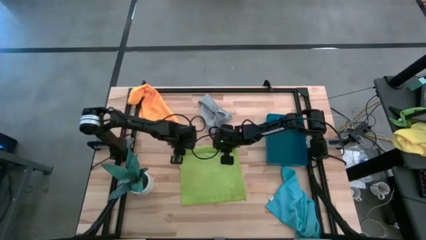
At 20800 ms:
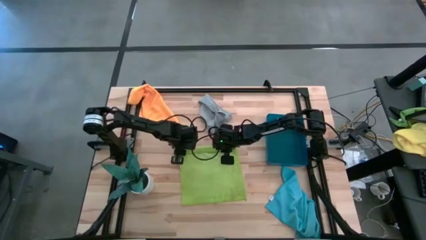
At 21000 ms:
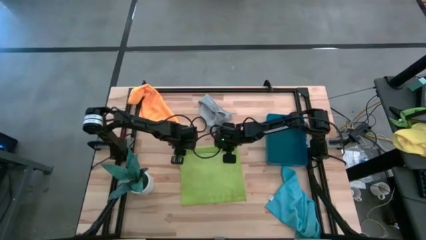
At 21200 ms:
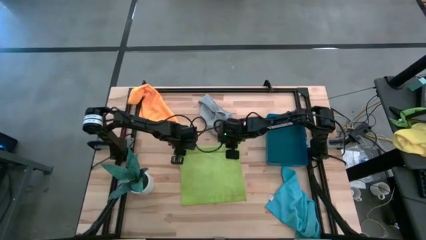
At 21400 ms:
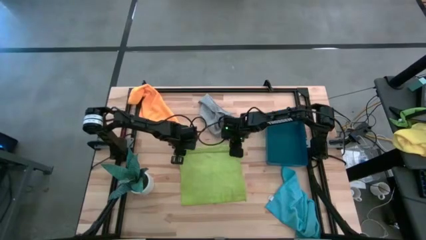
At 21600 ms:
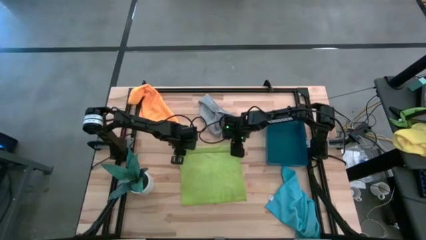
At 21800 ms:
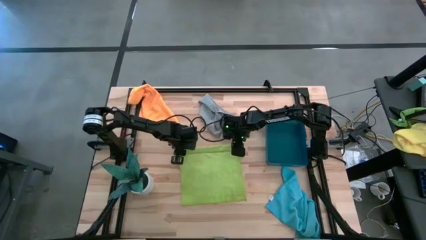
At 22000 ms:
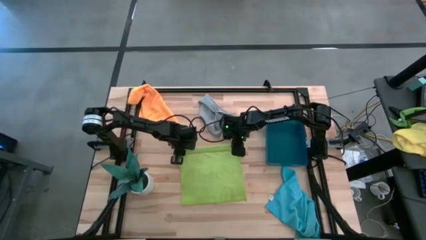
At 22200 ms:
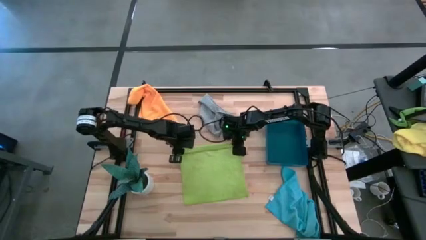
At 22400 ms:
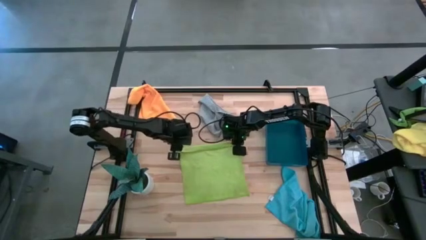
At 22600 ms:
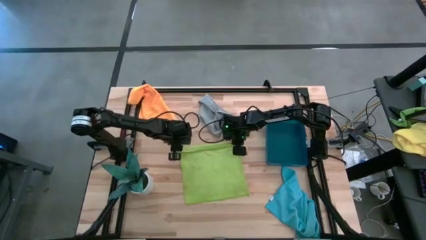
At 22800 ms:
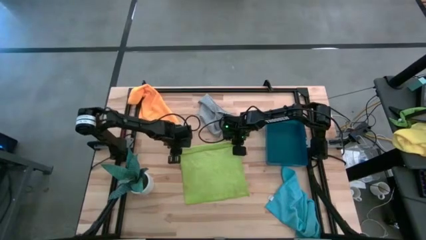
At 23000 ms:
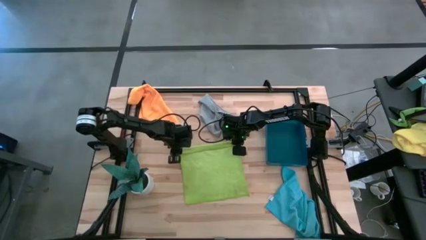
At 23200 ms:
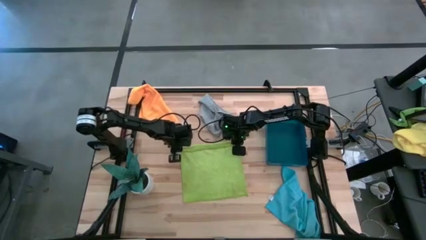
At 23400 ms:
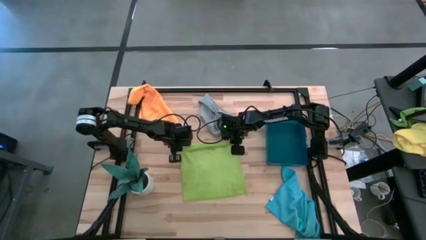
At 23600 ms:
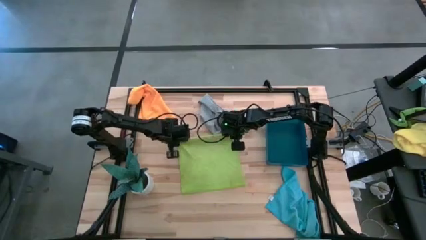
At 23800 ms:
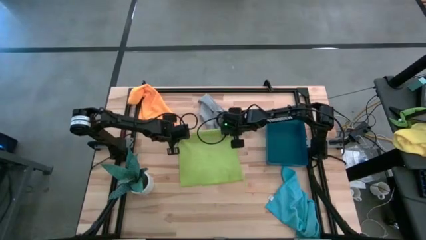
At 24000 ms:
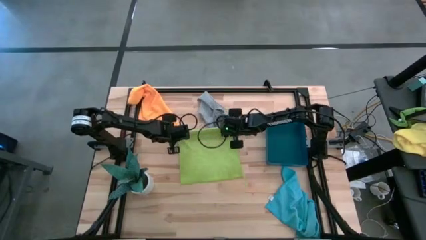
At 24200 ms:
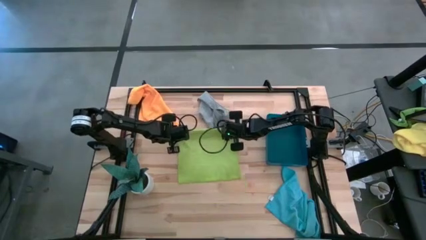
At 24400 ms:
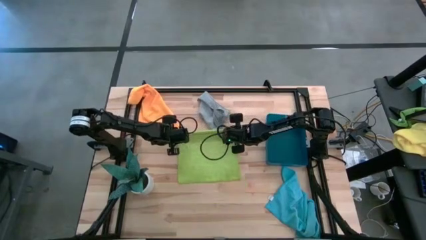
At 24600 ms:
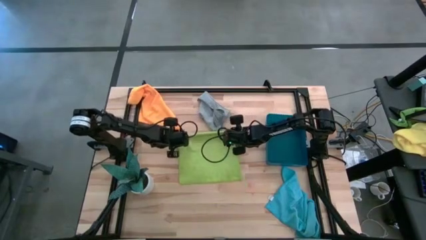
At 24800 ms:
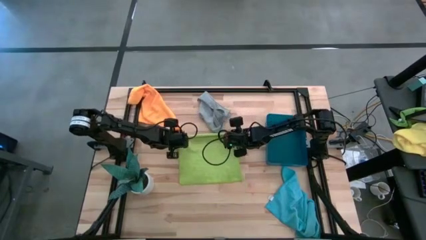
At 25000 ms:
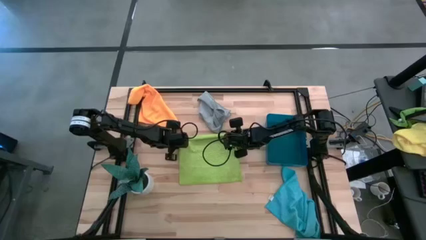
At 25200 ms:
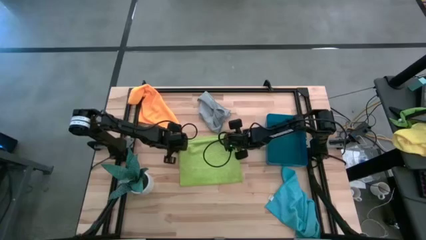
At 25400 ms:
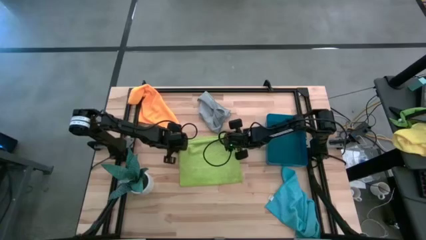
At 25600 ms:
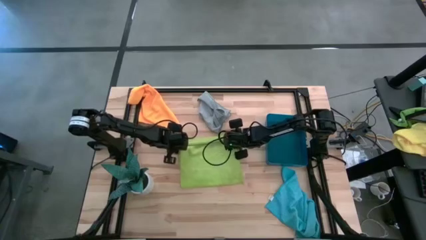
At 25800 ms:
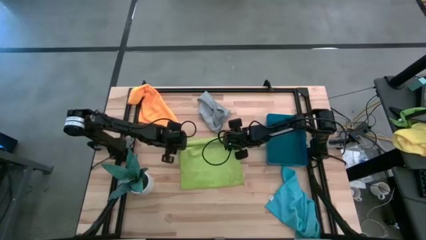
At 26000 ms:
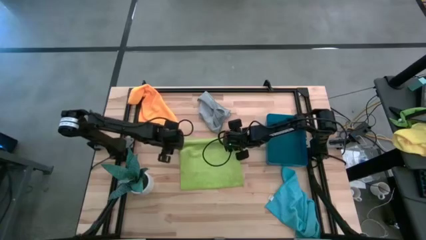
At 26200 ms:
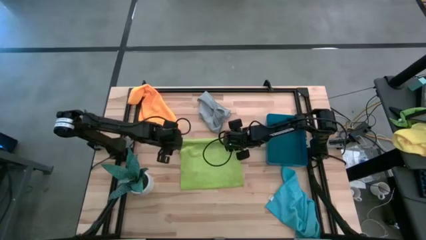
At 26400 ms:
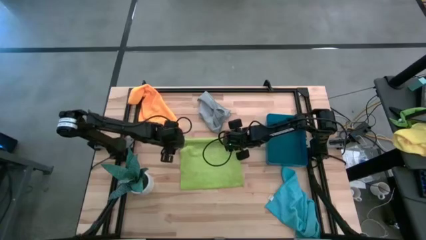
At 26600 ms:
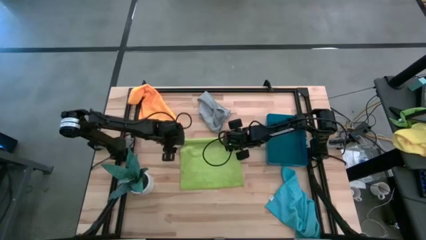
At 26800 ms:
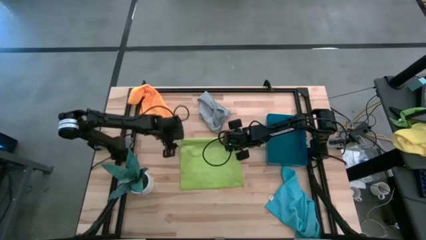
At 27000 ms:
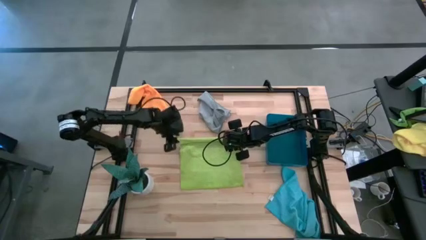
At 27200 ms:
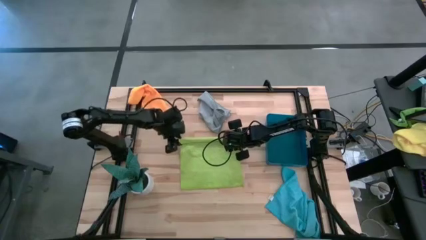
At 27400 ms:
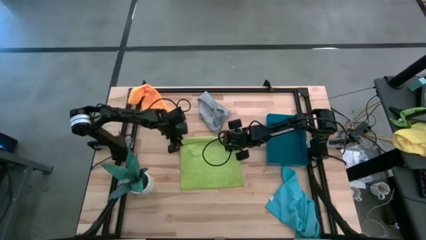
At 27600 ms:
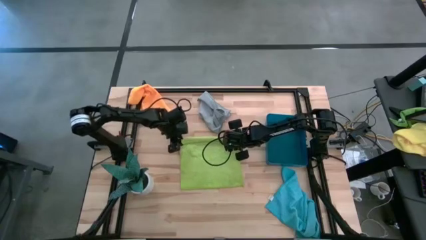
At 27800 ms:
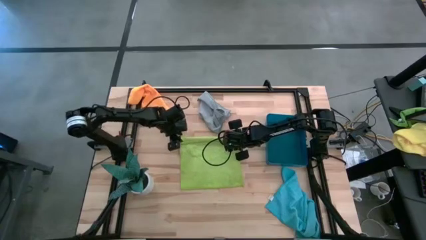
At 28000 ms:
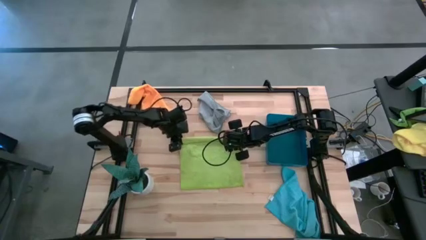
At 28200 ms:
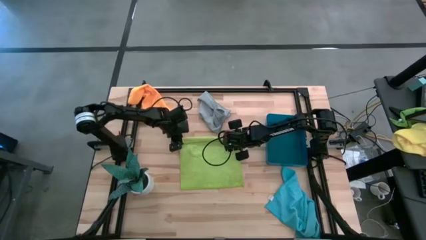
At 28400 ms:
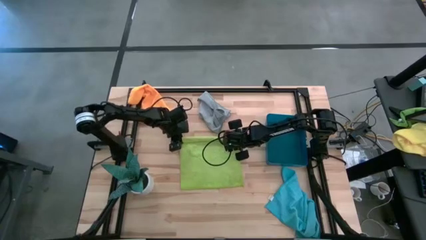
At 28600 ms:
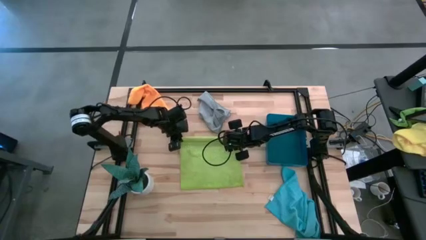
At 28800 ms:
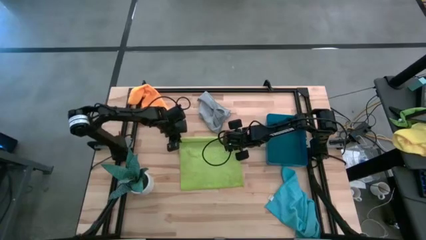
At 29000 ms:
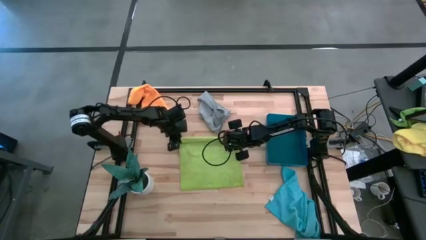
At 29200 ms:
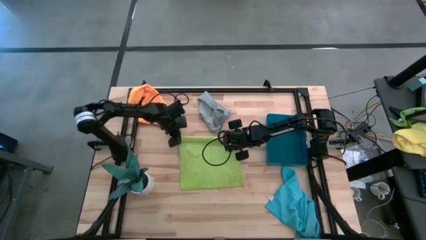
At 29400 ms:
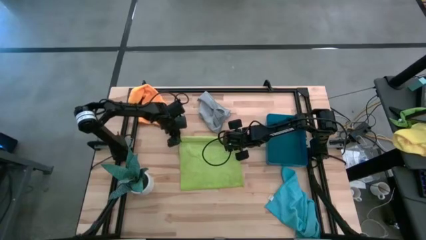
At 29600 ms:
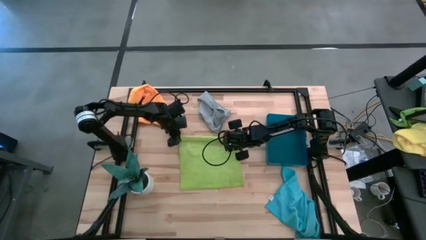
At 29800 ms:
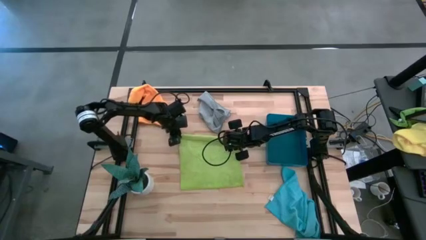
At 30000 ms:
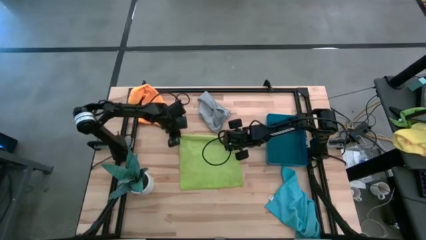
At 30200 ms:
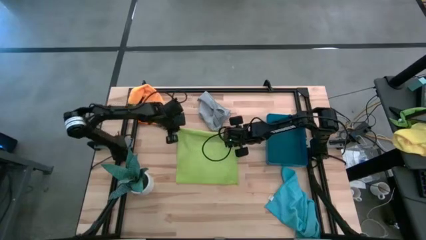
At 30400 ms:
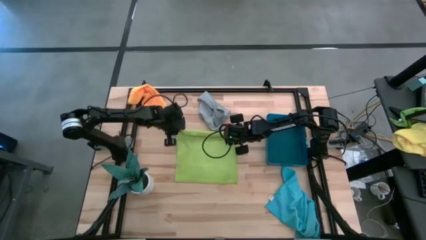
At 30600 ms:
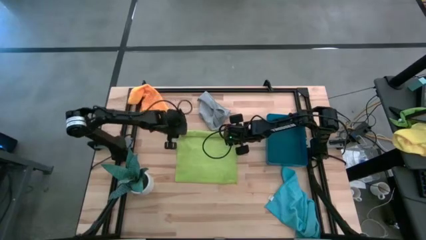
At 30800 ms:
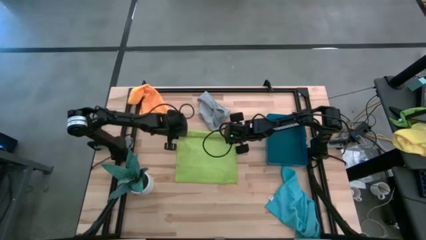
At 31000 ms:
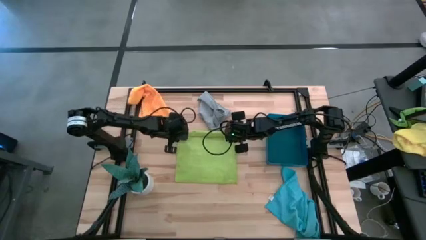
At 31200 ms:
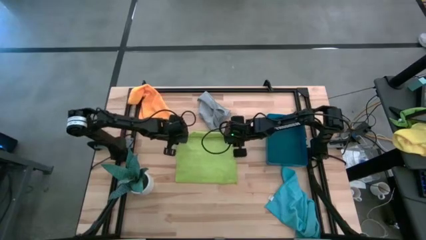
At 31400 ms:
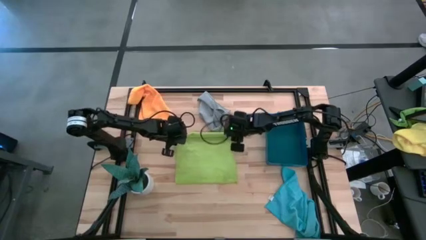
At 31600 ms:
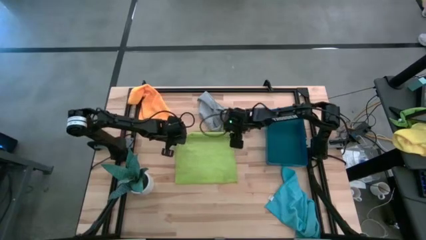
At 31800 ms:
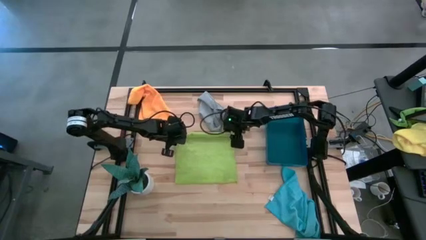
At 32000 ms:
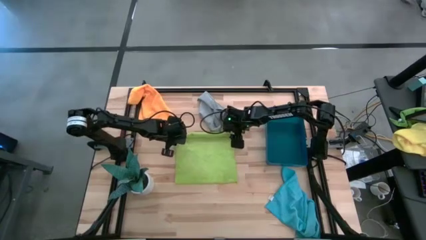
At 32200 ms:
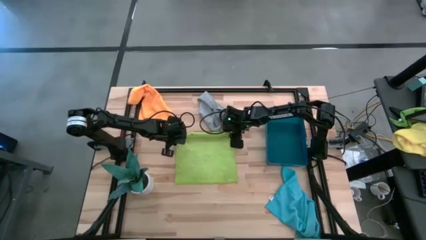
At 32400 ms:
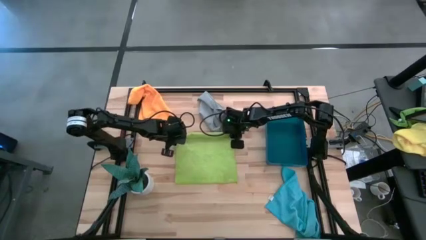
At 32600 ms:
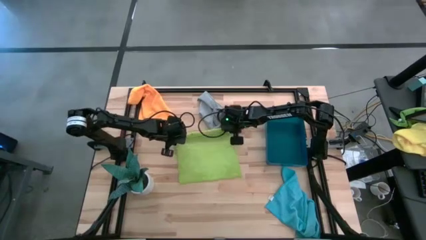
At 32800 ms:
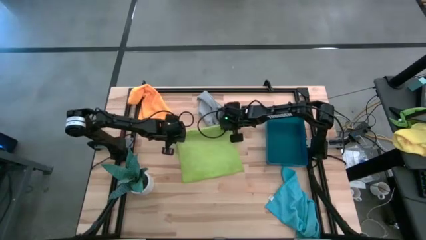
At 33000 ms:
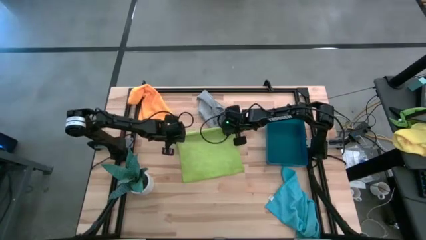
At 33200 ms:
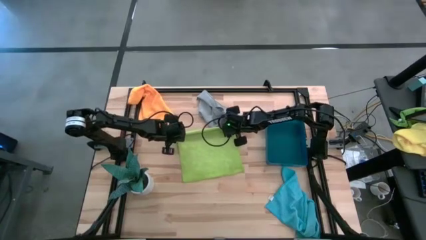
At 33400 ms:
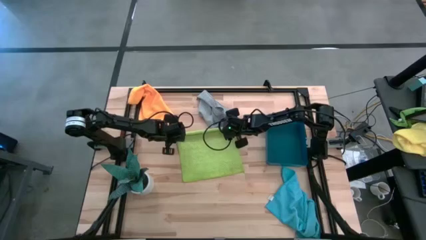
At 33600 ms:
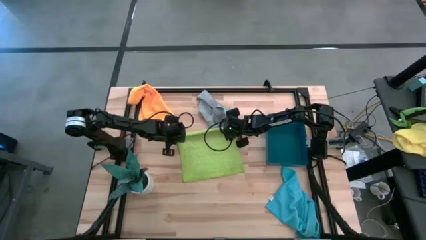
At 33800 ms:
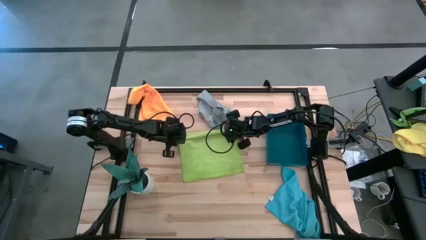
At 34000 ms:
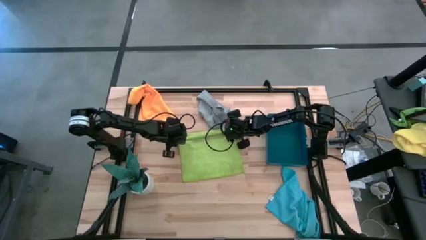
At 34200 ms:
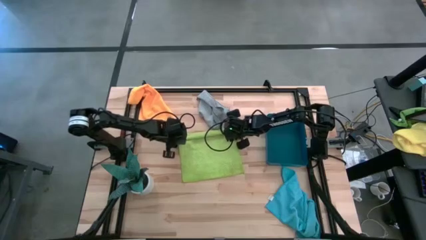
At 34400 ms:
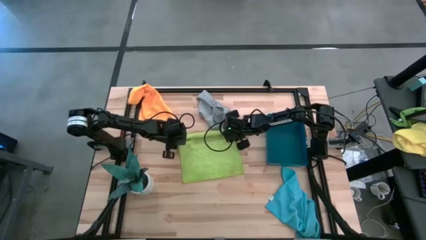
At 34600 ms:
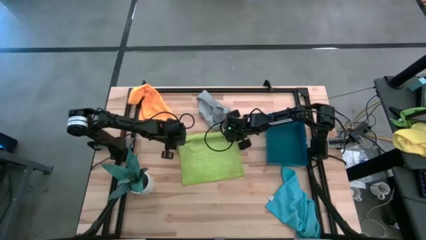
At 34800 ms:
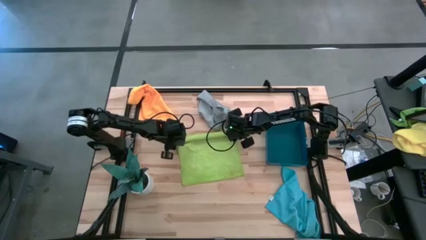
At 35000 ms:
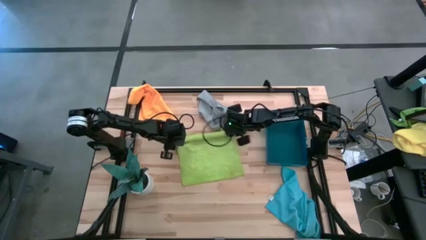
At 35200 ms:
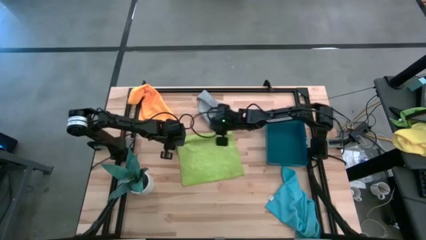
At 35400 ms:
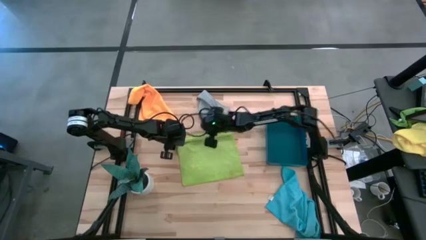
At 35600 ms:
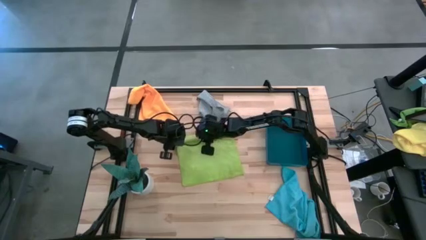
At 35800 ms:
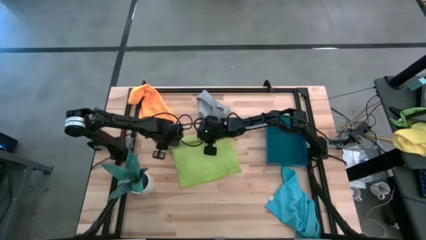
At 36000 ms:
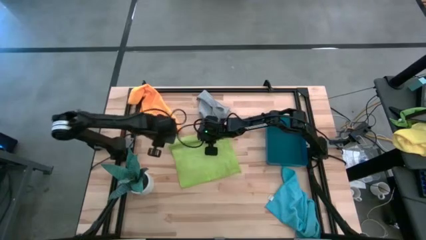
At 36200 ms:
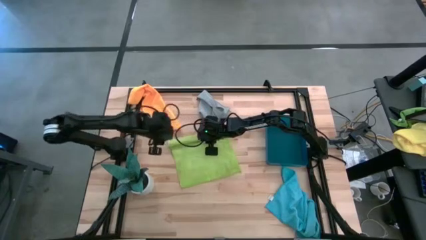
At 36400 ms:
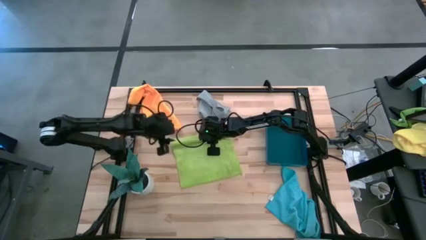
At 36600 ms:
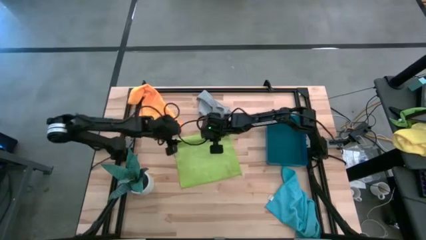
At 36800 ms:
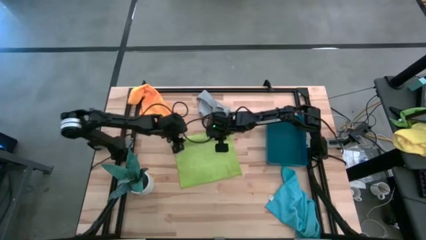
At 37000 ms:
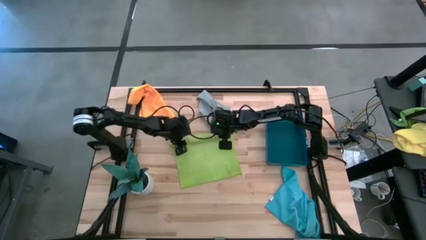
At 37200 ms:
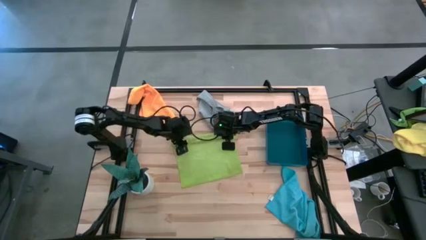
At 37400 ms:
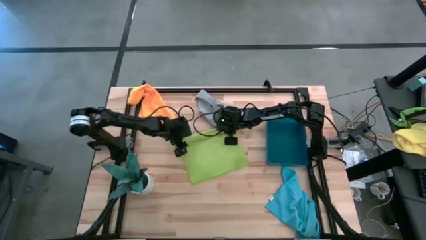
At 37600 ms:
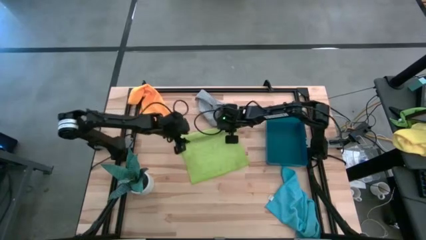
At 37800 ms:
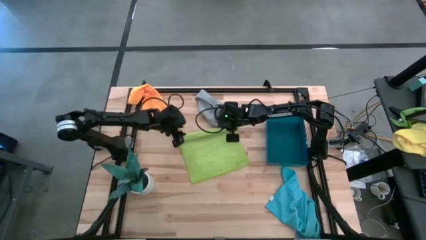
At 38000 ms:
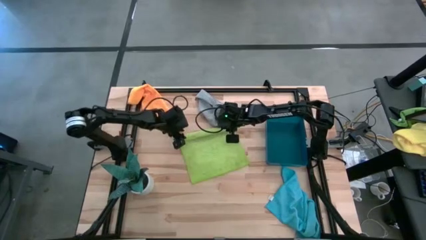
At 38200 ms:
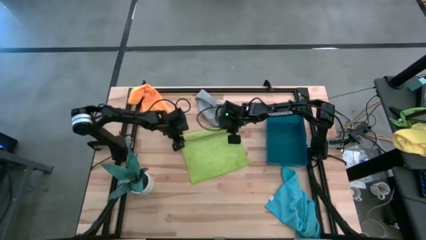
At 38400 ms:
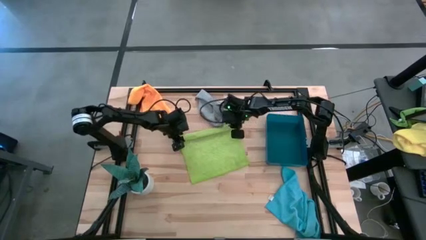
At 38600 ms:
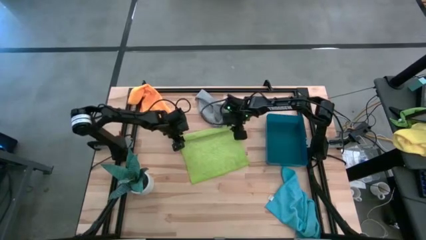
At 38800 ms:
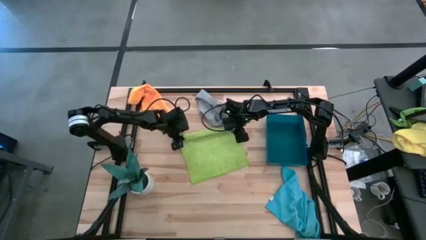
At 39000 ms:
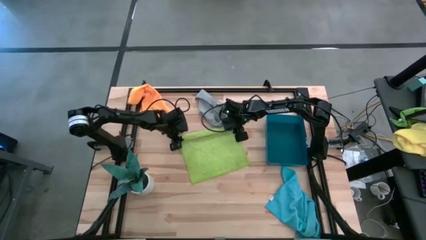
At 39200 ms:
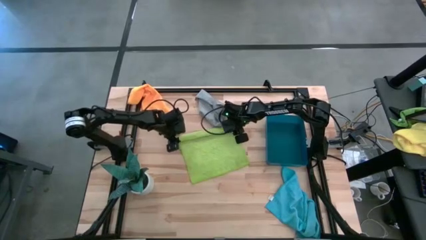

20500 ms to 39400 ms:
Task: Roll microfiber towels into tight, uniform cylinder then place into a basket
Roll the green towel
